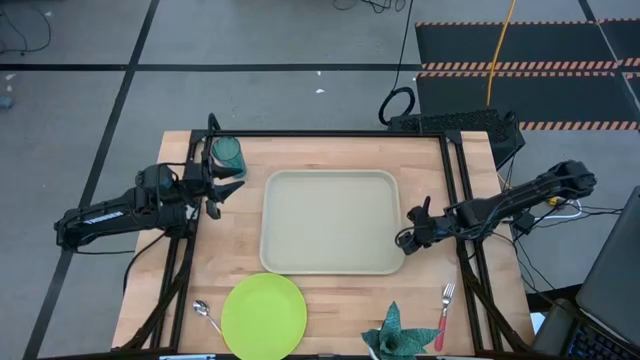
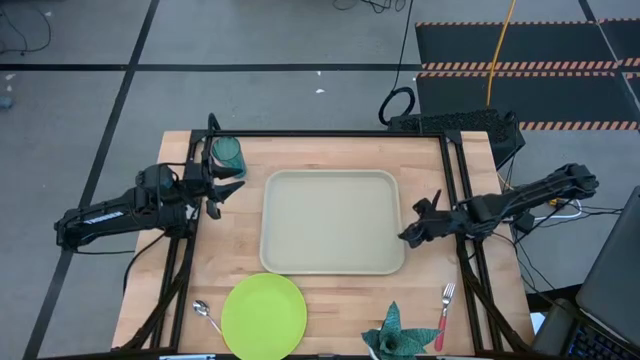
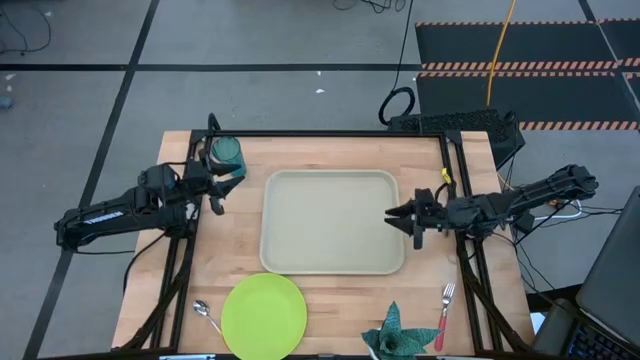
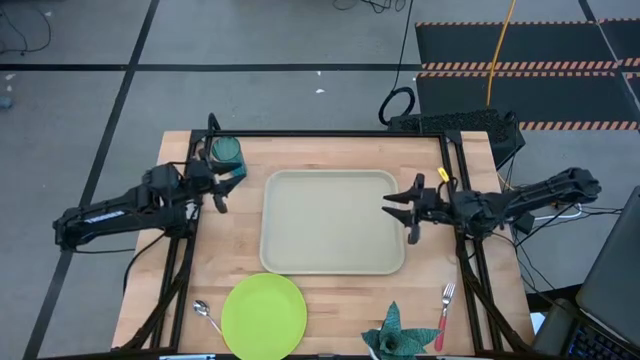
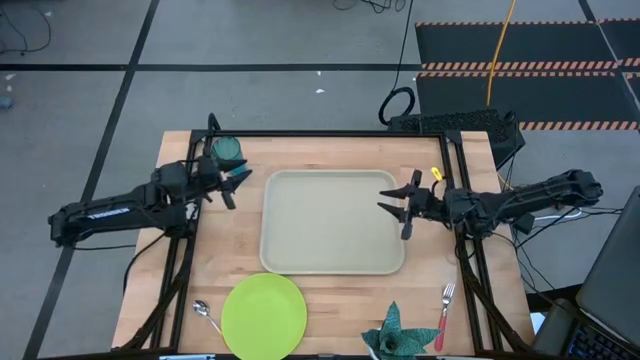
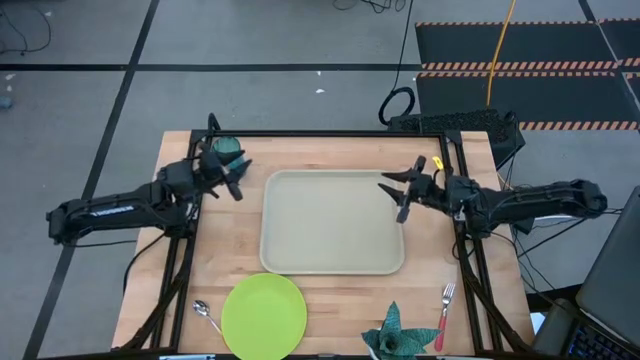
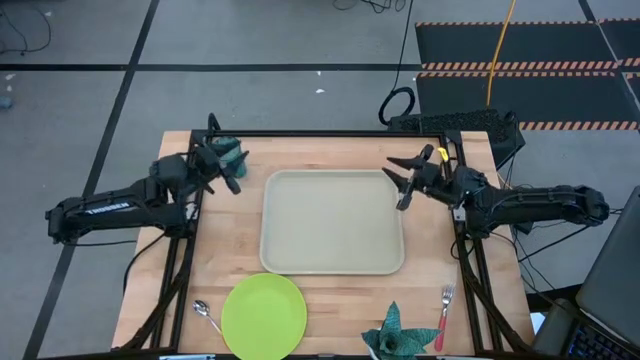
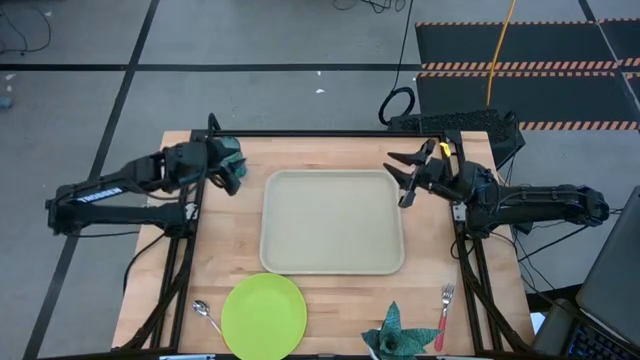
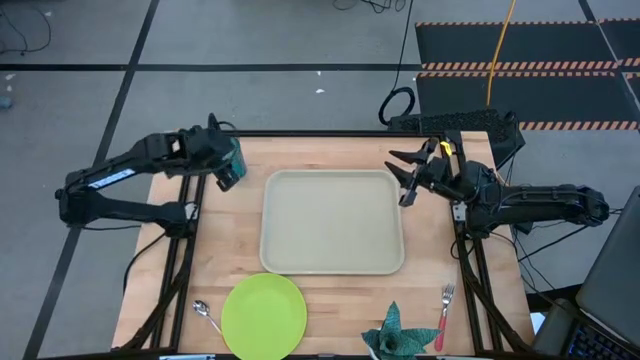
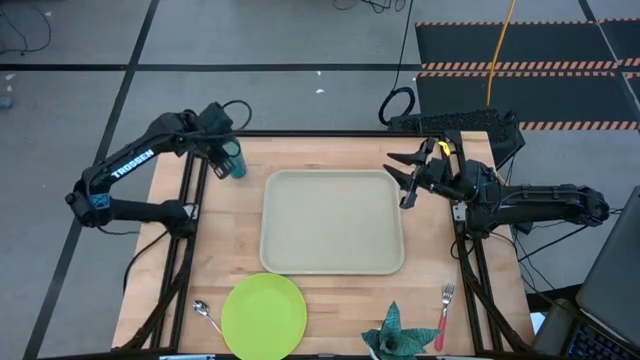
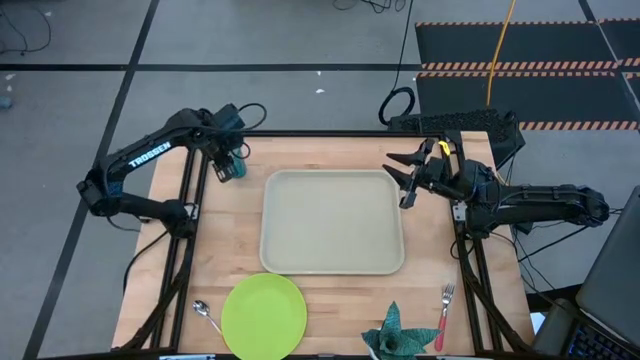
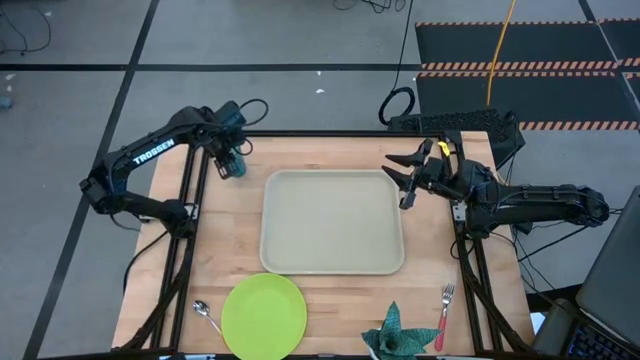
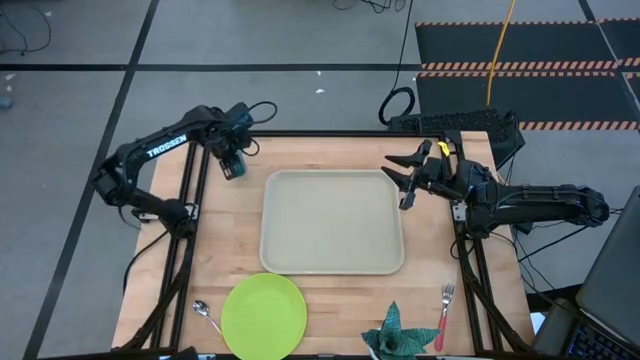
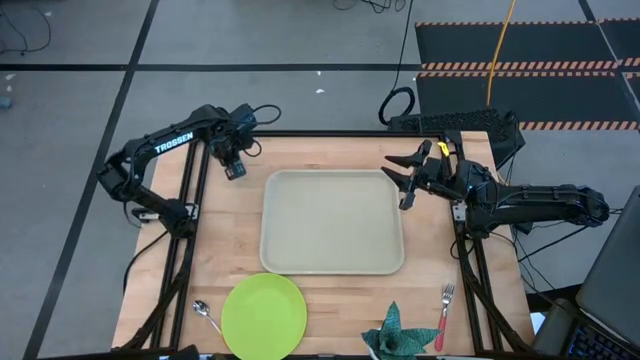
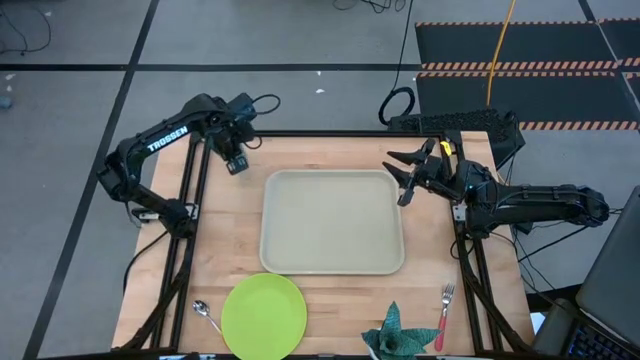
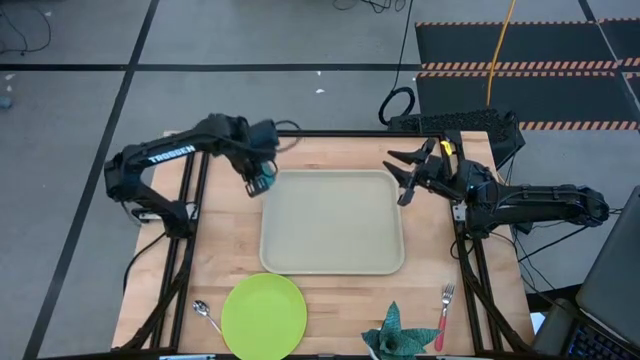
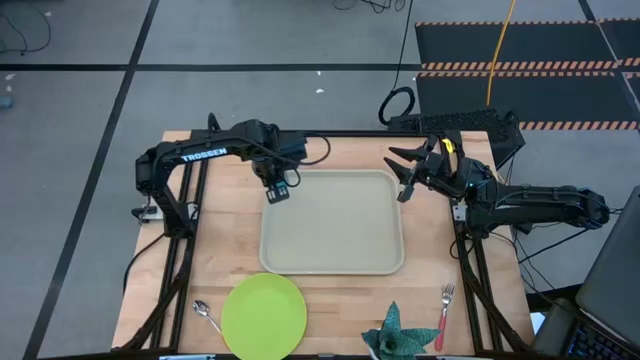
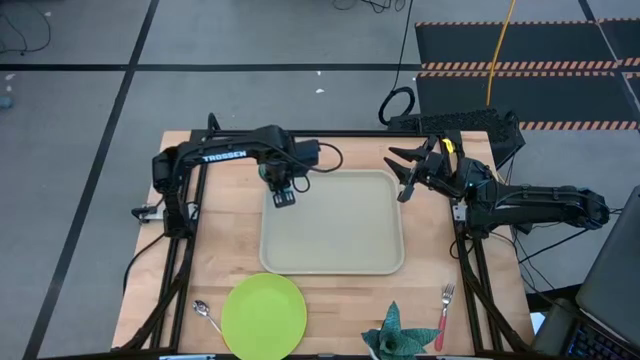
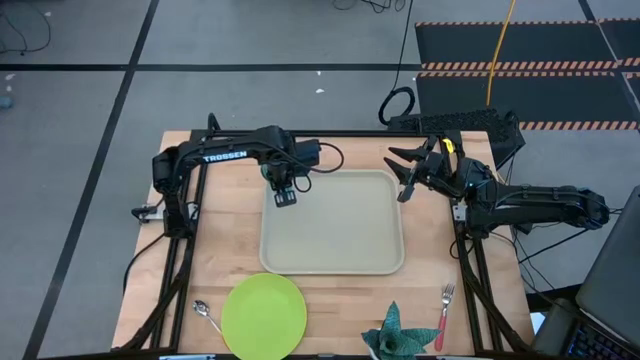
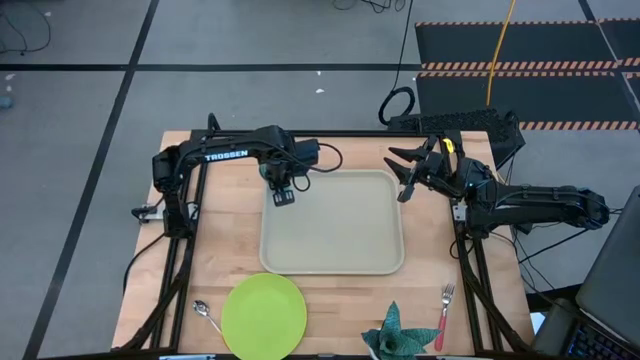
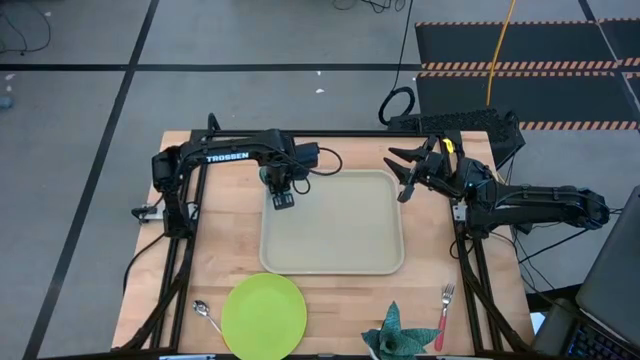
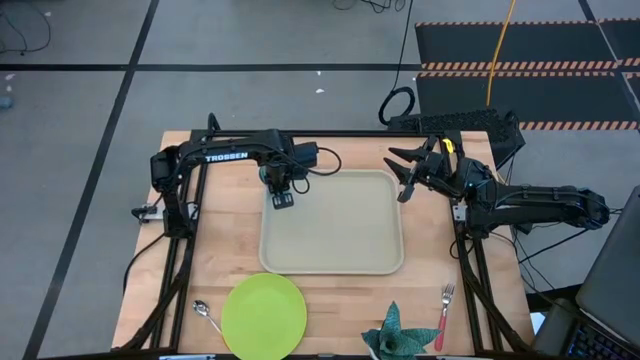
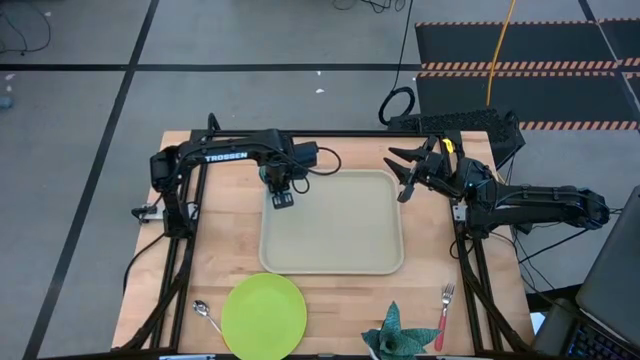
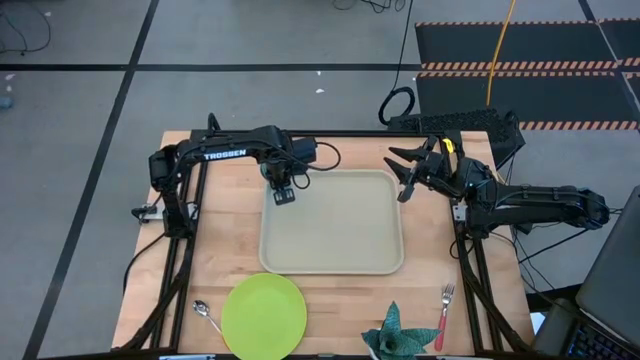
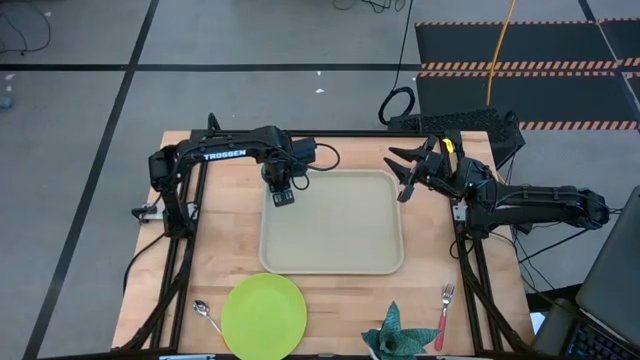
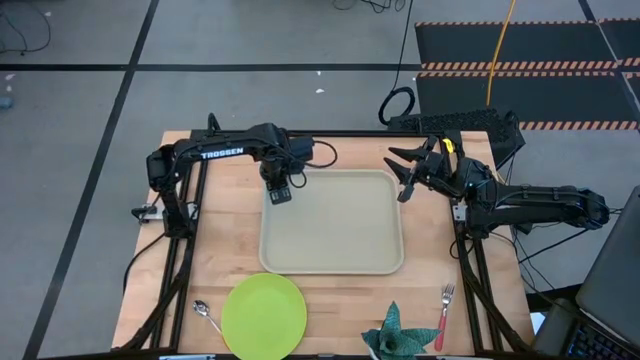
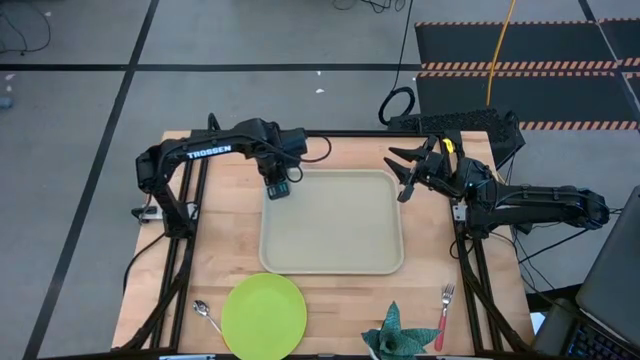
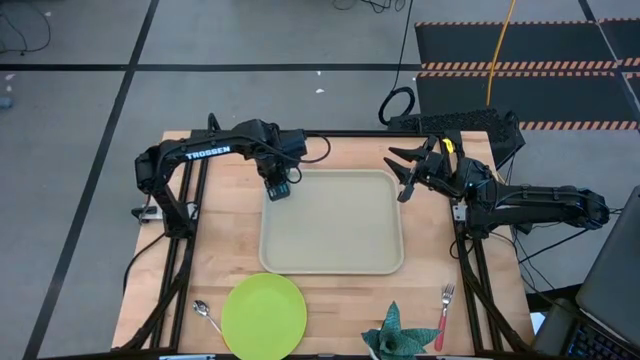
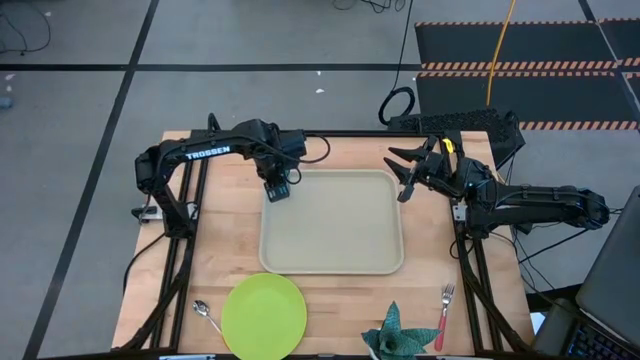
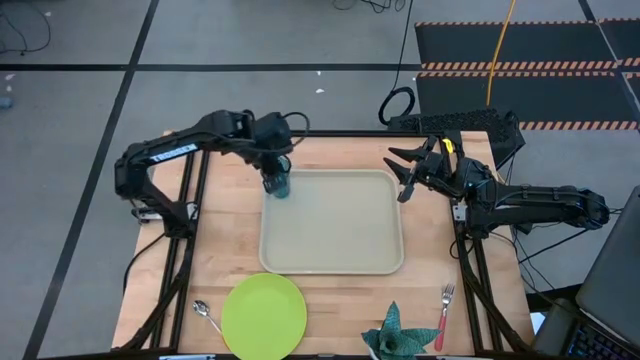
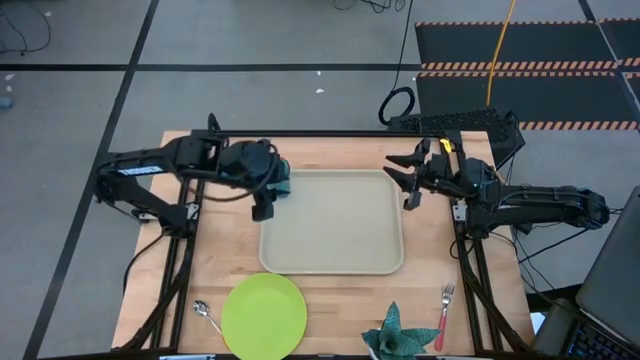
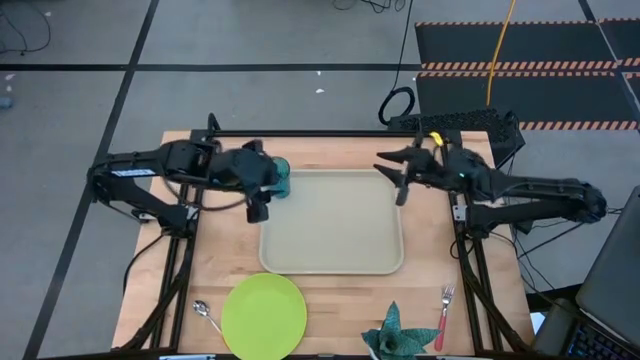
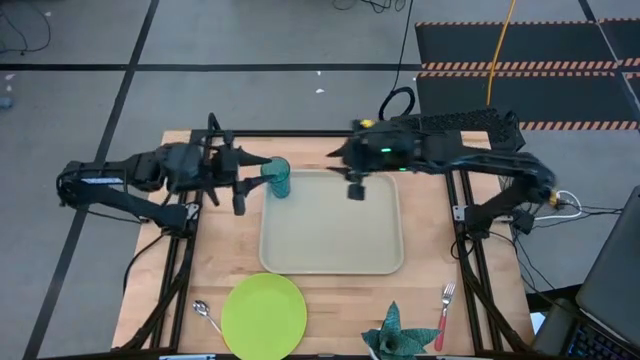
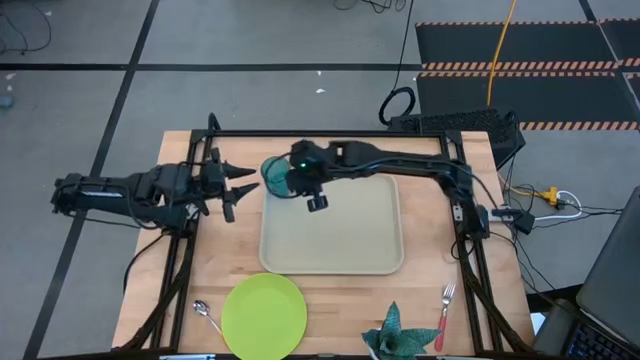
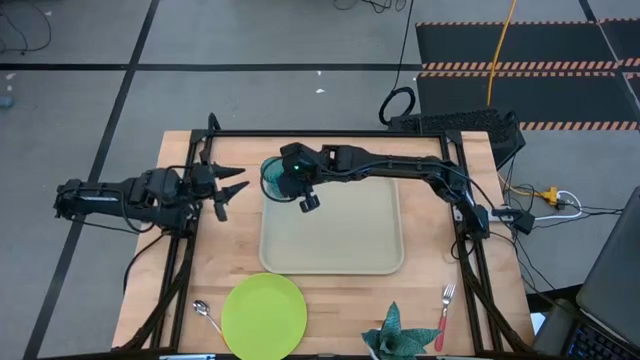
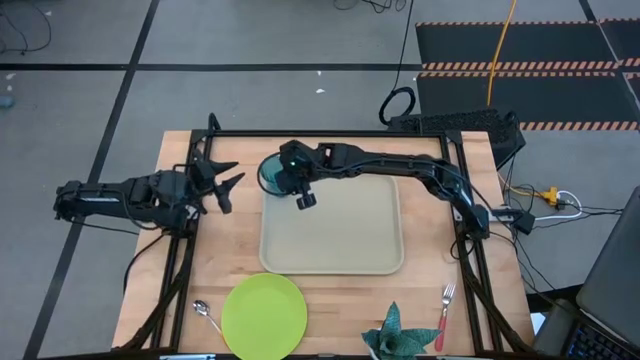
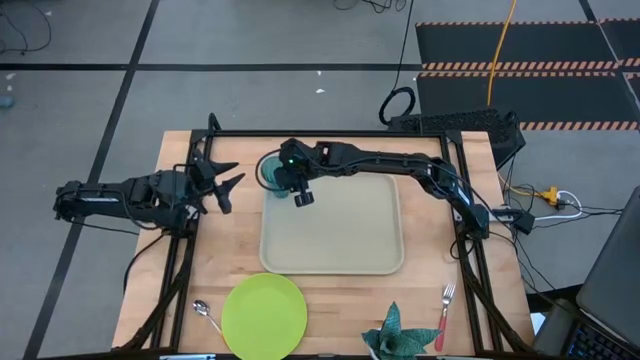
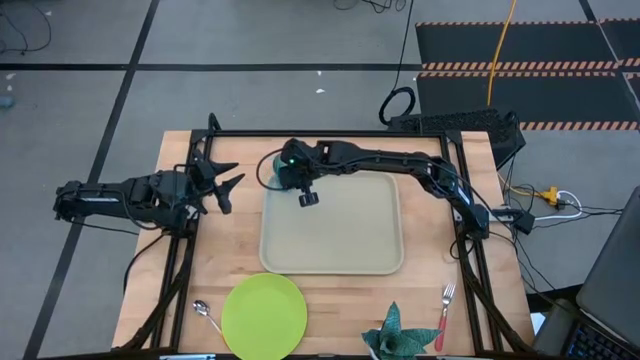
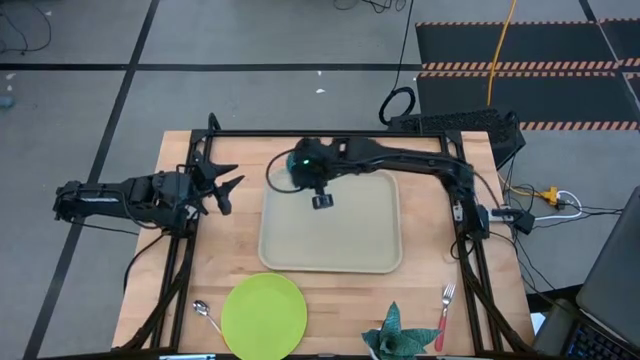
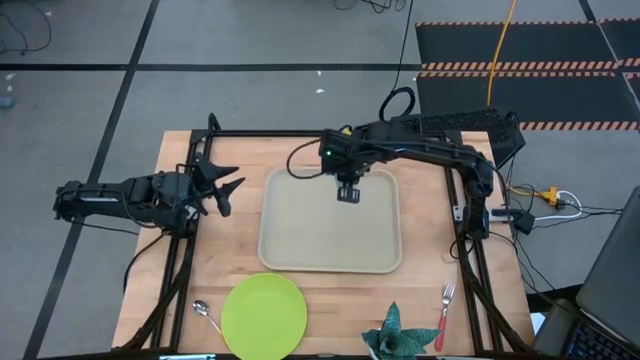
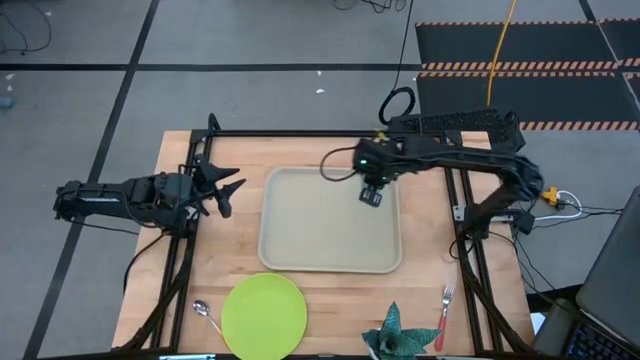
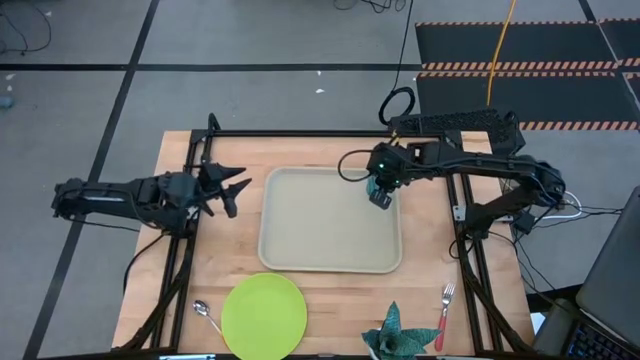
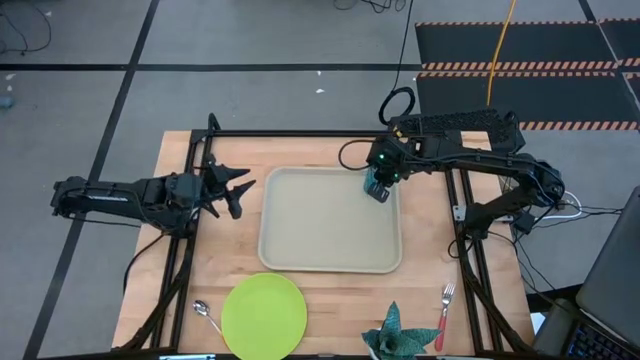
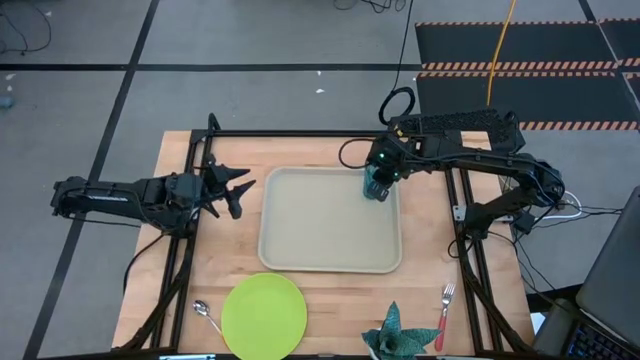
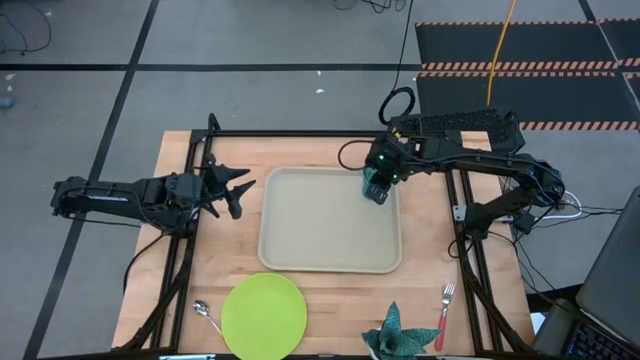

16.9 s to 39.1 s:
Task: Pick and place plate/cup/fork/spoon on tray
Put the blue glass on the top right of the light brown serving tray
